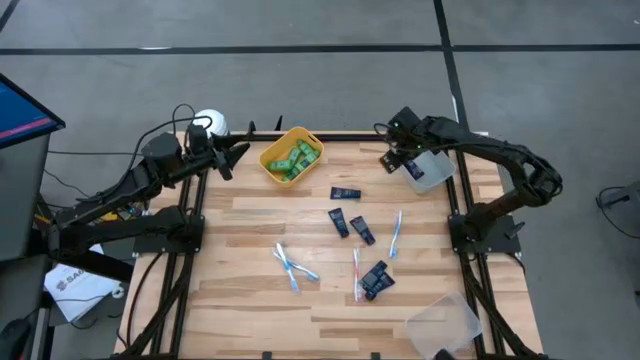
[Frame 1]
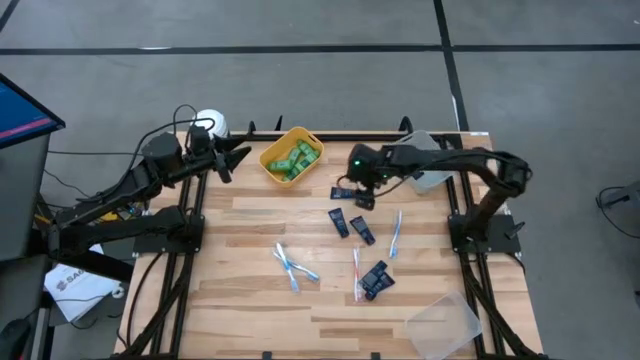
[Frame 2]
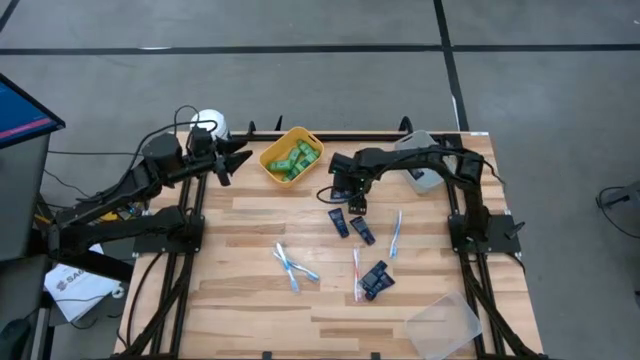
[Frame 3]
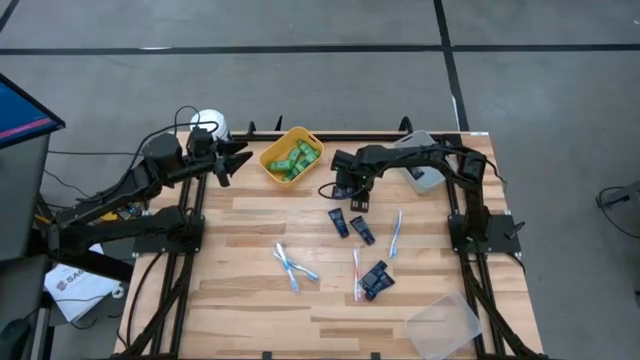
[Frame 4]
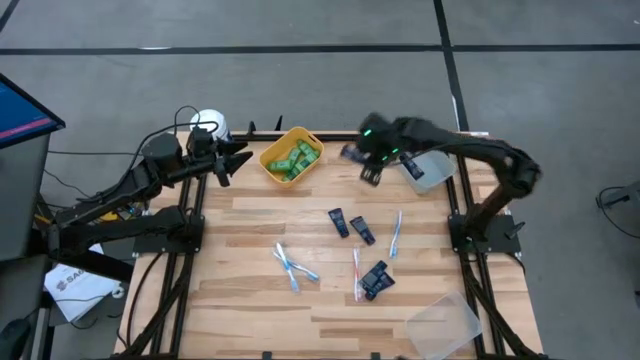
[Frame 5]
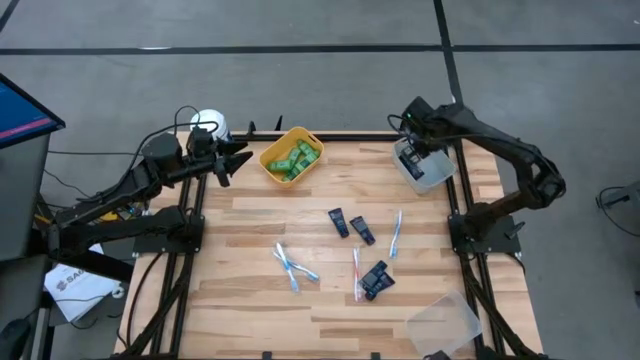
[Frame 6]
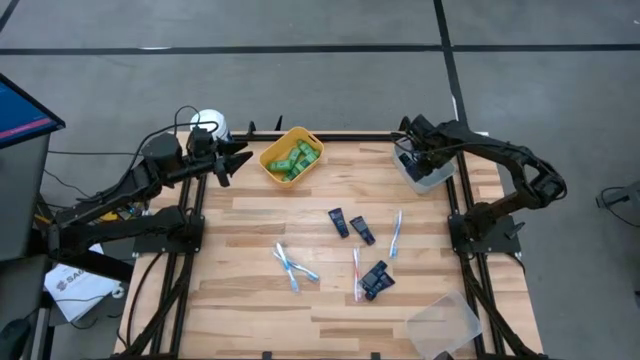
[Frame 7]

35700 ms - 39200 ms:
Task: Pick & Place Travel size toiletries
Put the blue shave cream into the gray bin

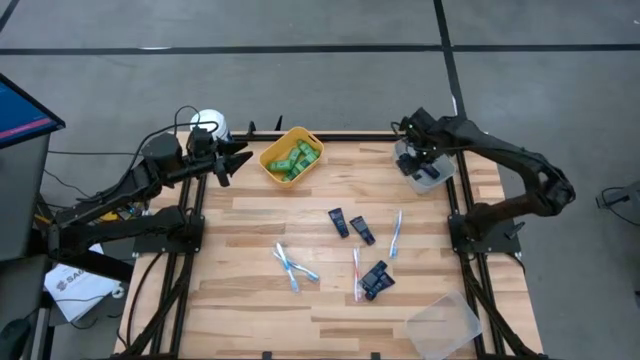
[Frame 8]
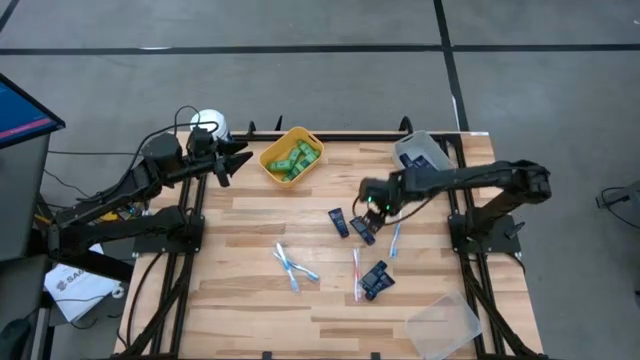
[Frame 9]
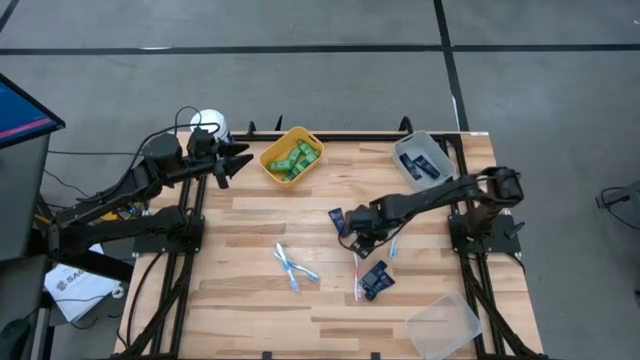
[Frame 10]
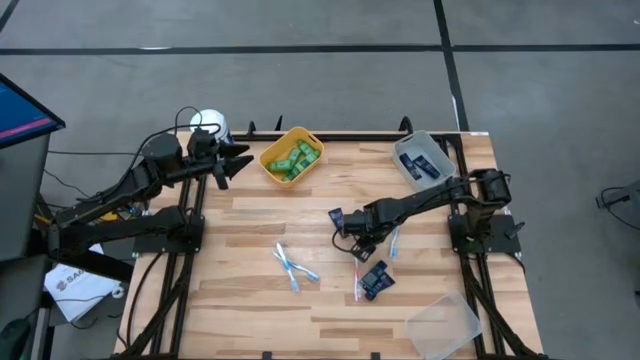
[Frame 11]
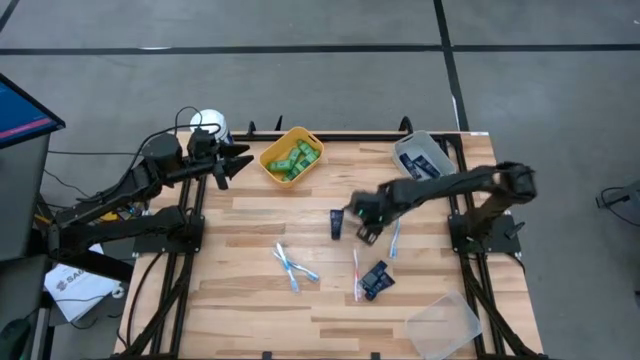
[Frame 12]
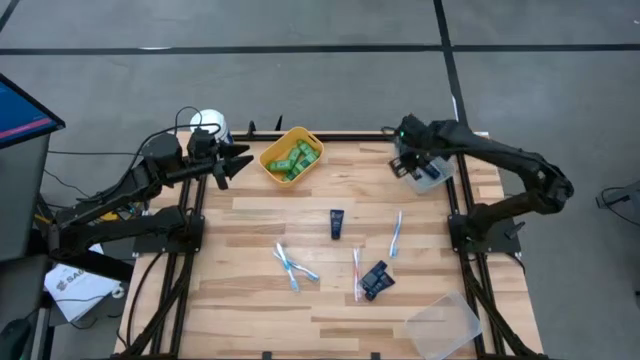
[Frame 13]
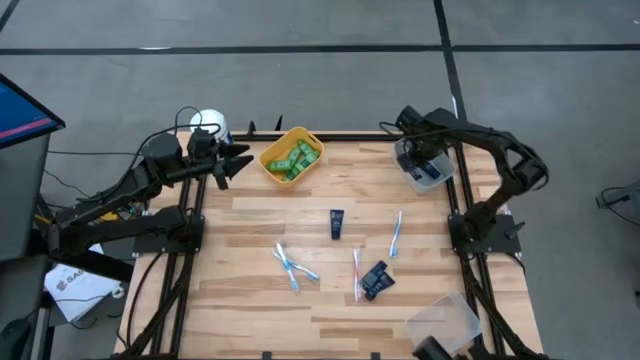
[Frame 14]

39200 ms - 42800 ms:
Put the blue shave cream into the gray bin

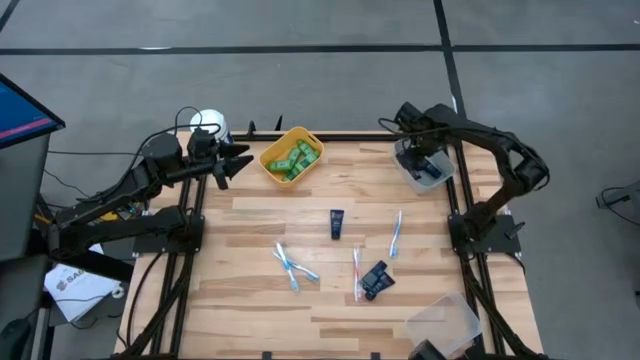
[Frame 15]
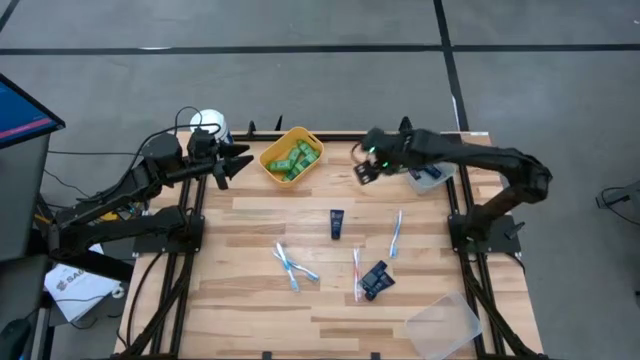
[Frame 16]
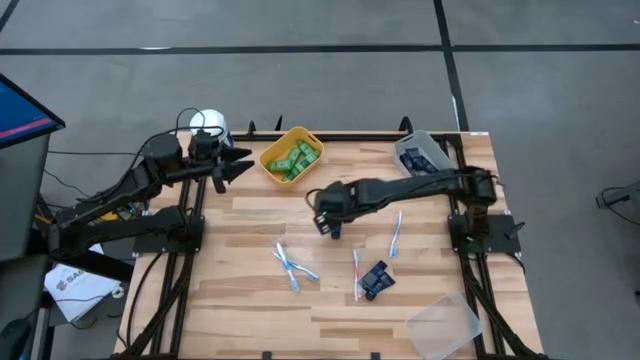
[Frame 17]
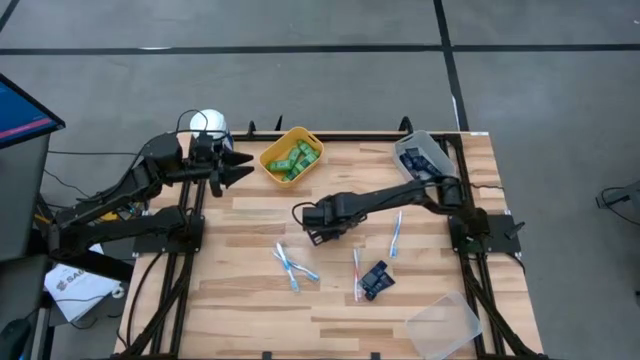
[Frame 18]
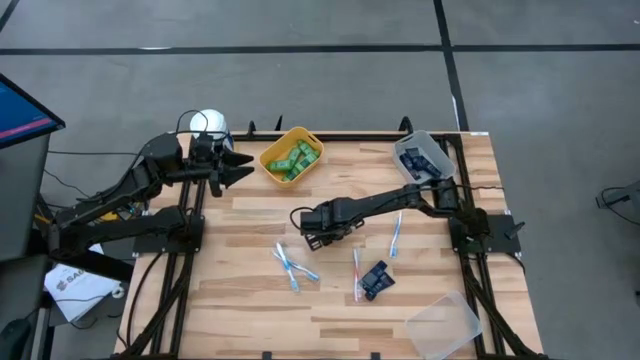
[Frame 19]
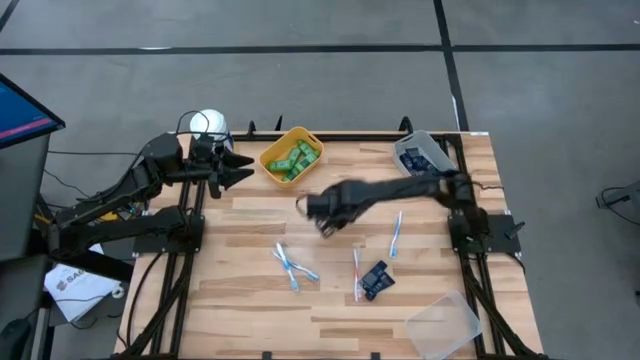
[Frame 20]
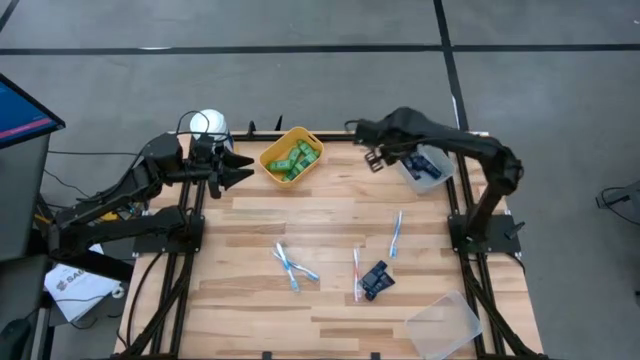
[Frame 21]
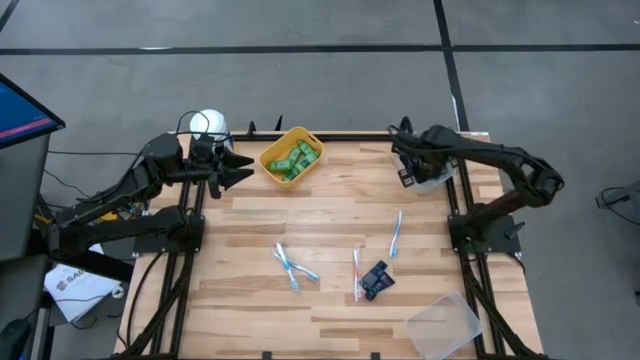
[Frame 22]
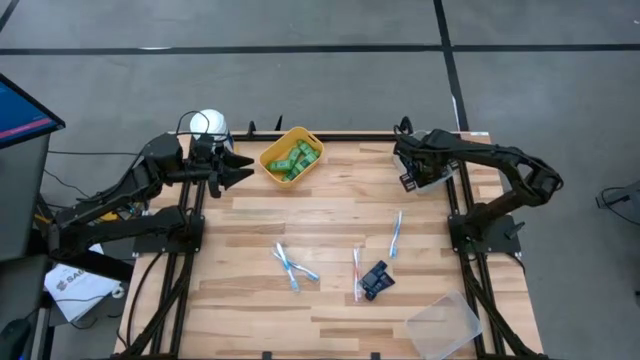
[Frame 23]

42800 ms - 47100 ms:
Put the blue shave cream into the gray bin

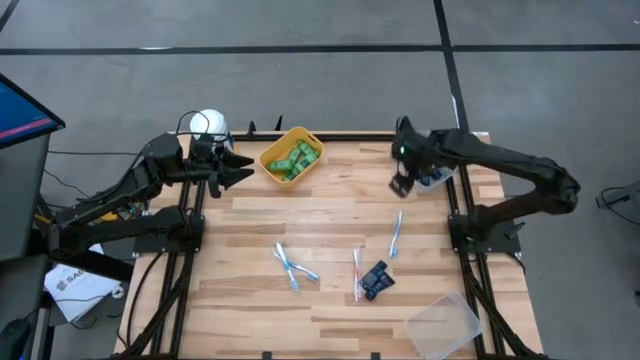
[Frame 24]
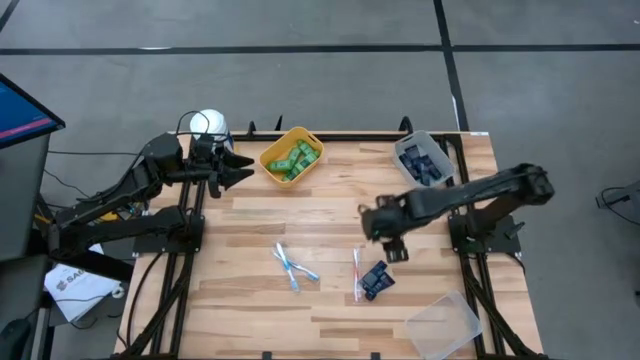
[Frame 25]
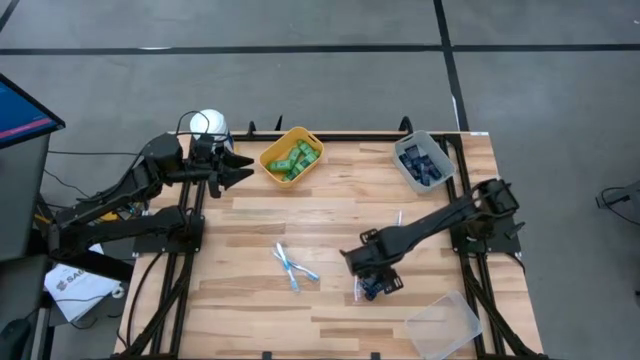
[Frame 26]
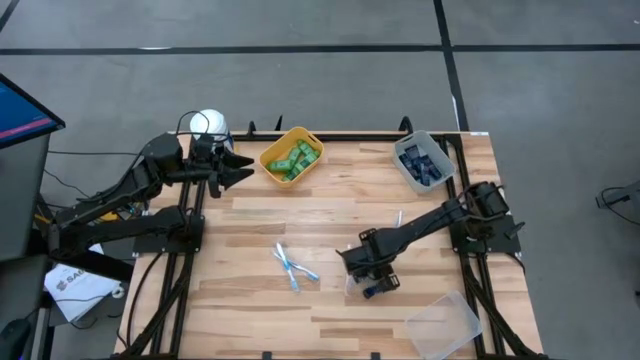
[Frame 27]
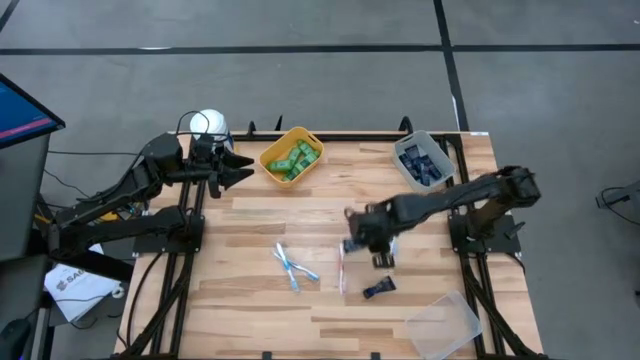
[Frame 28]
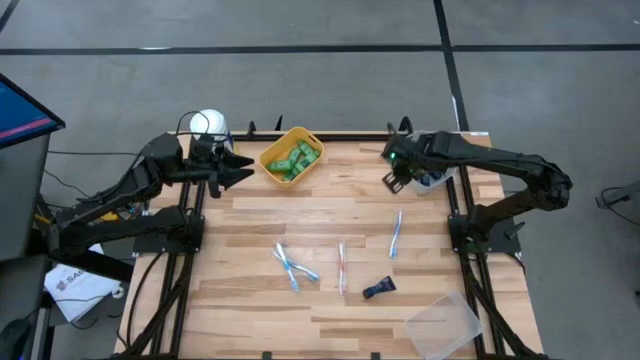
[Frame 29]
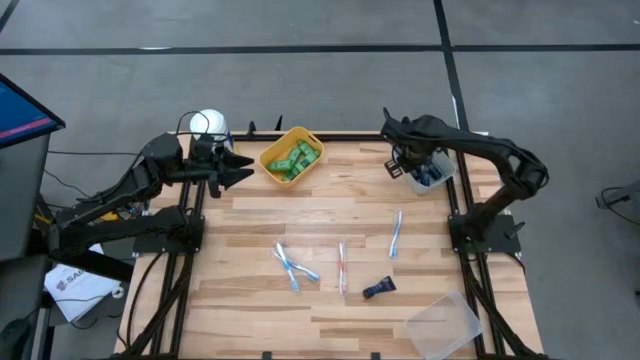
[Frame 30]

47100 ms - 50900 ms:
Put the blue shave cream into the gray bin

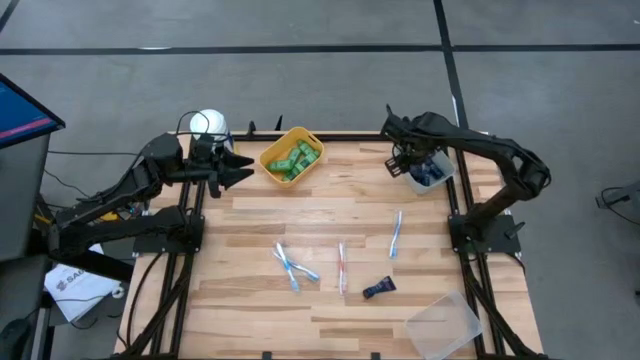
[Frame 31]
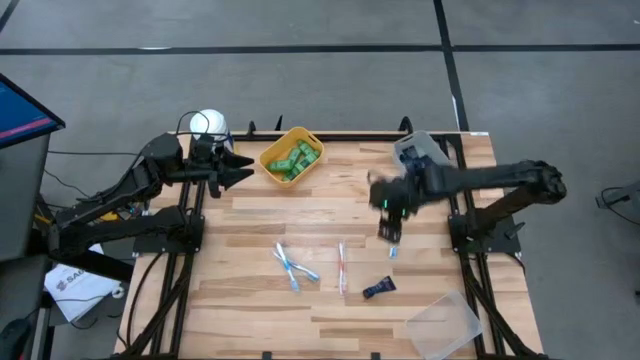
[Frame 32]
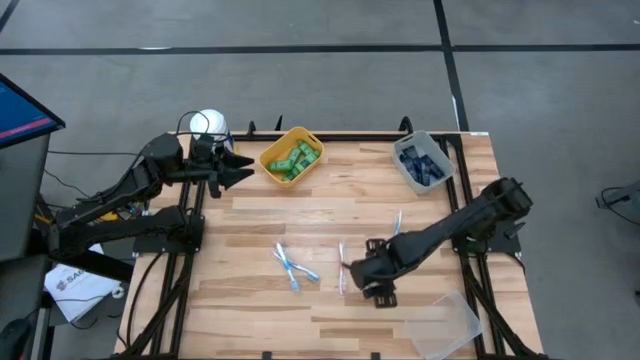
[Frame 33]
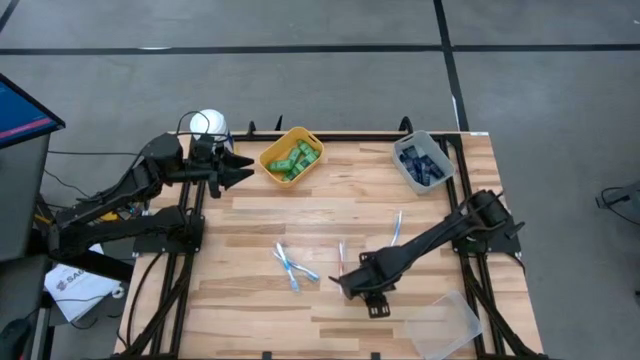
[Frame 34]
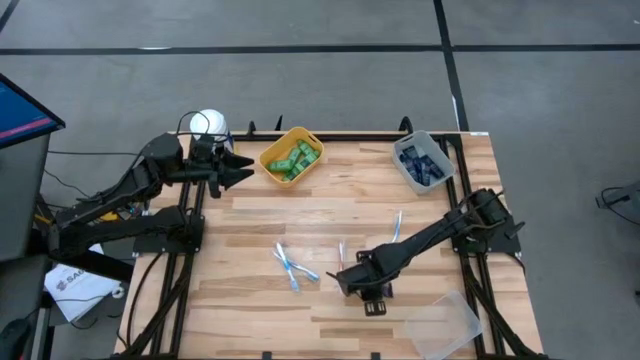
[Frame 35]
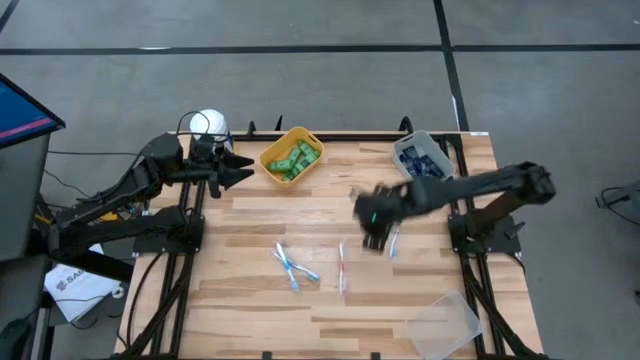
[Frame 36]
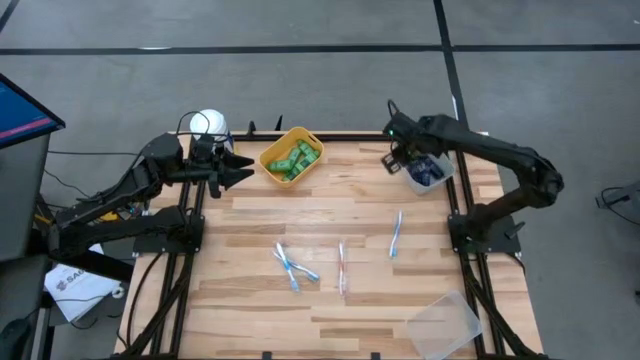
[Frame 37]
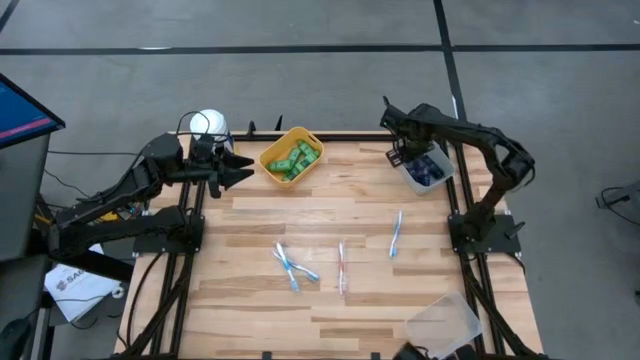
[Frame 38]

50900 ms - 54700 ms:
Put the blue shave cream into the gray bin

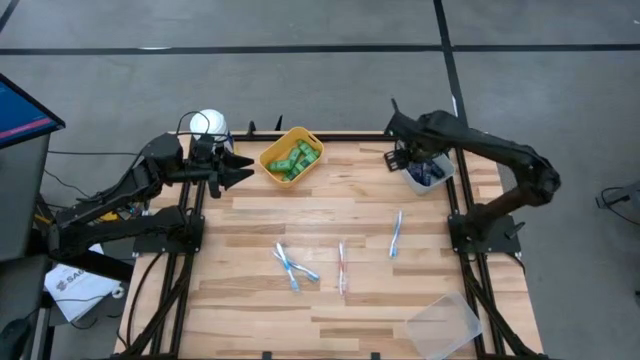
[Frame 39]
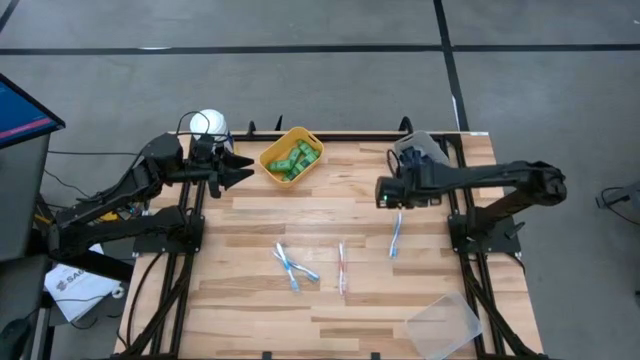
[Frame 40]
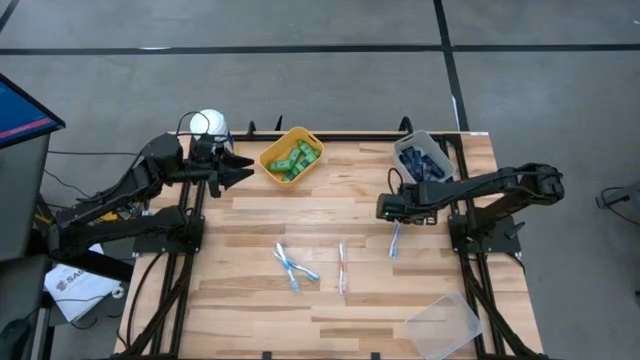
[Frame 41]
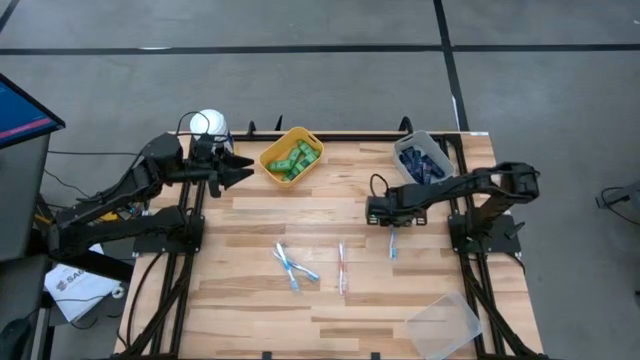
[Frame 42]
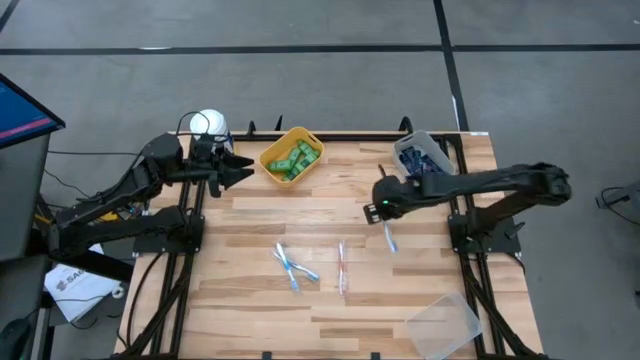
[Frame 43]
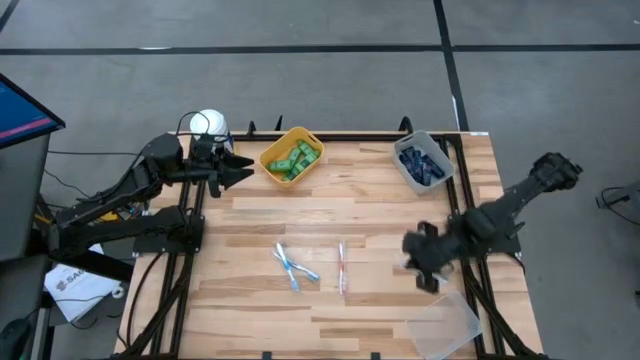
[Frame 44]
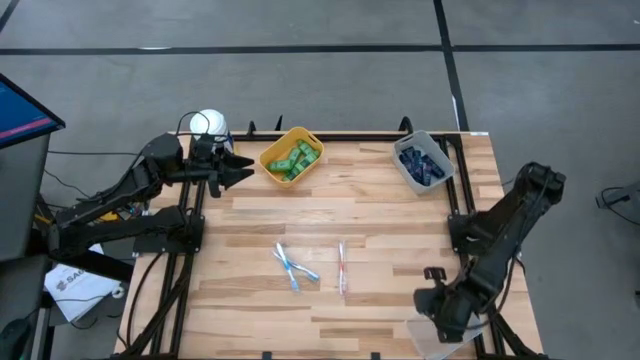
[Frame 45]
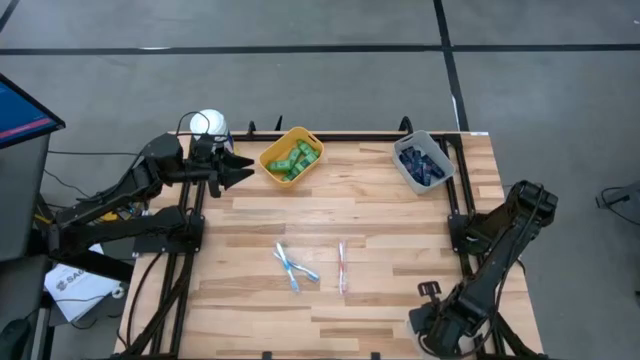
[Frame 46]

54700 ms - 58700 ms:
Put the blue toothbrush into the white bin
